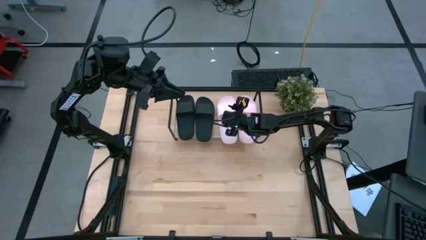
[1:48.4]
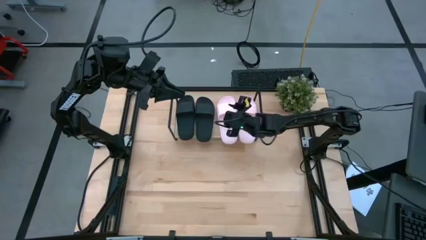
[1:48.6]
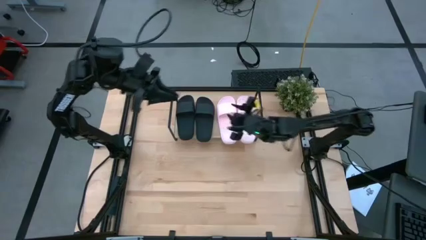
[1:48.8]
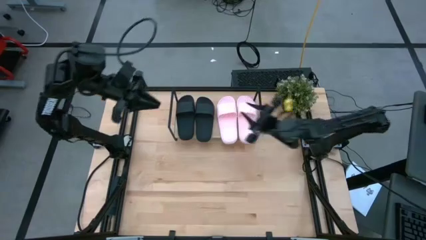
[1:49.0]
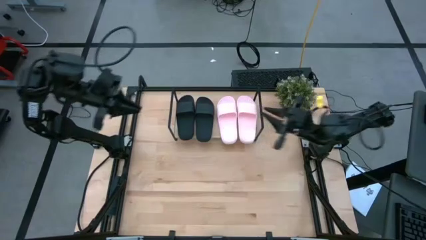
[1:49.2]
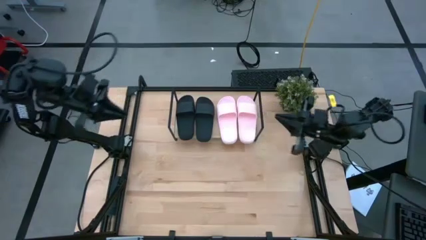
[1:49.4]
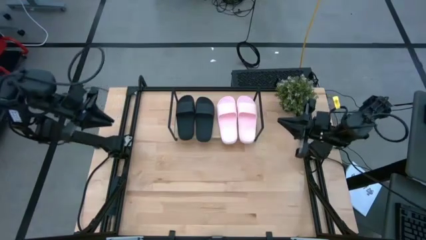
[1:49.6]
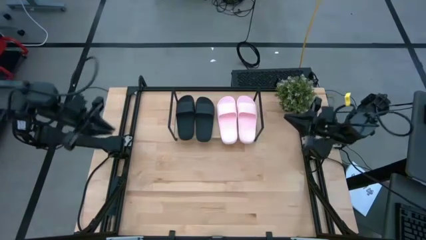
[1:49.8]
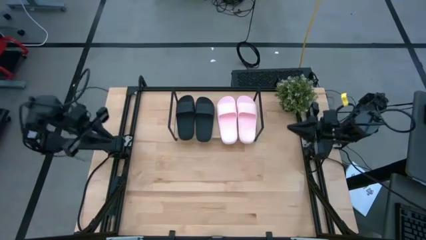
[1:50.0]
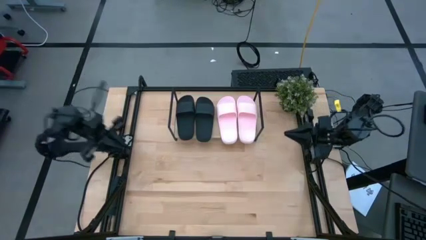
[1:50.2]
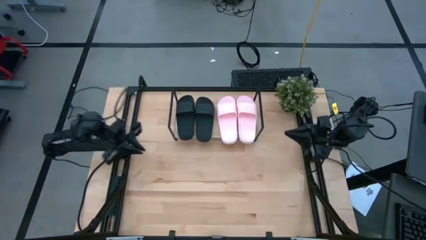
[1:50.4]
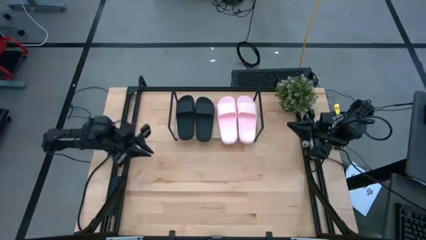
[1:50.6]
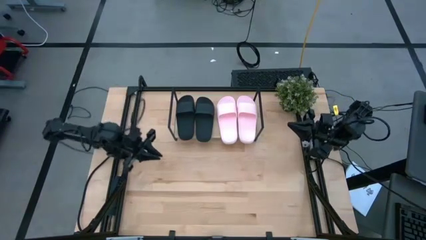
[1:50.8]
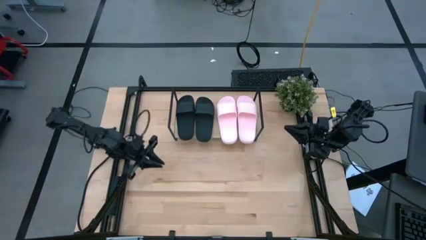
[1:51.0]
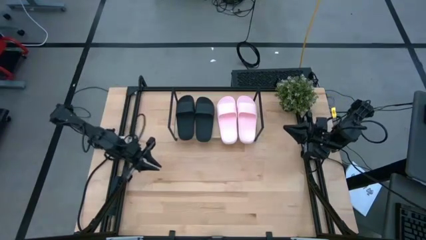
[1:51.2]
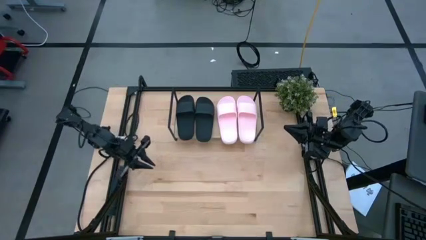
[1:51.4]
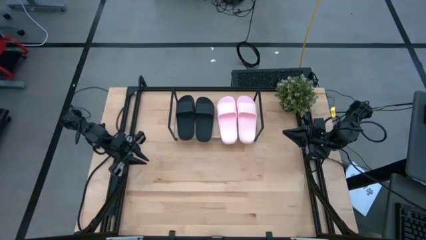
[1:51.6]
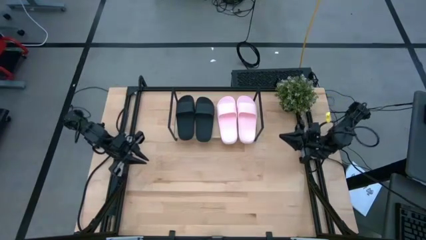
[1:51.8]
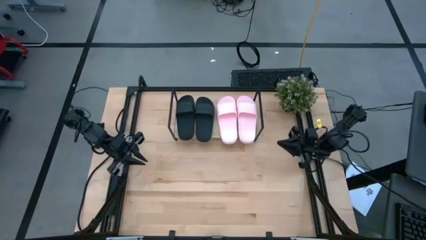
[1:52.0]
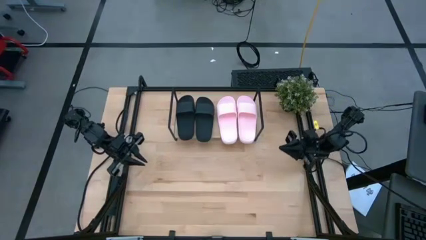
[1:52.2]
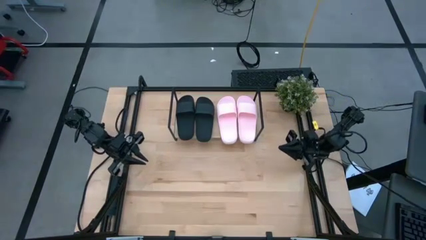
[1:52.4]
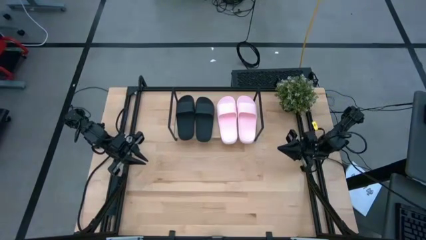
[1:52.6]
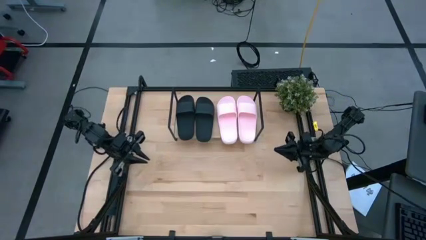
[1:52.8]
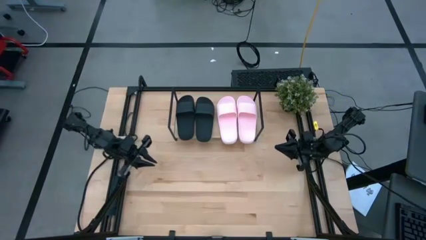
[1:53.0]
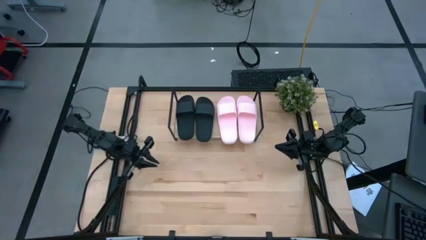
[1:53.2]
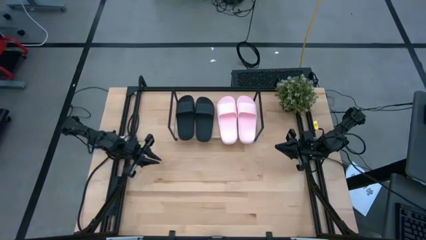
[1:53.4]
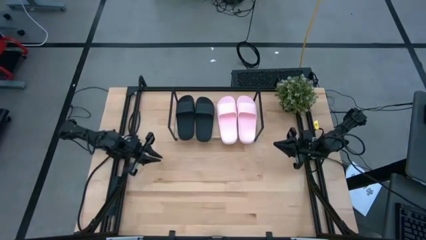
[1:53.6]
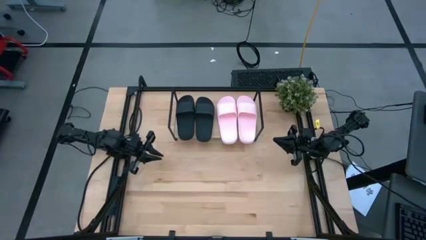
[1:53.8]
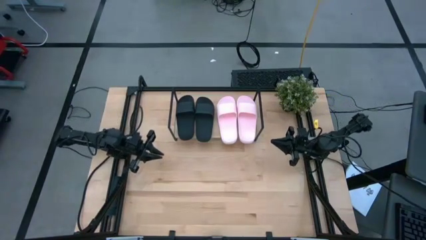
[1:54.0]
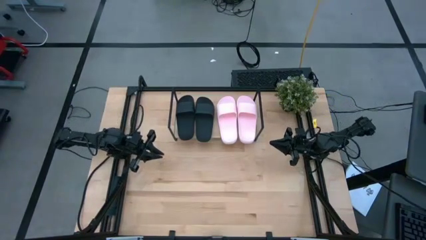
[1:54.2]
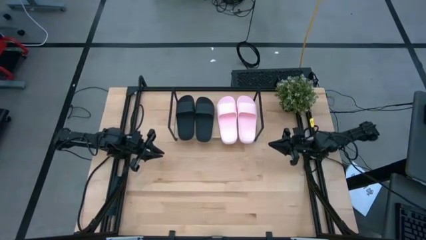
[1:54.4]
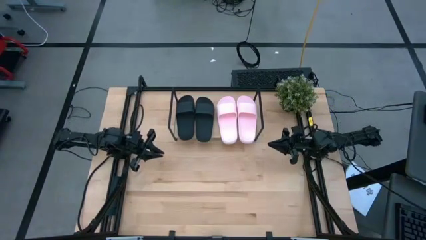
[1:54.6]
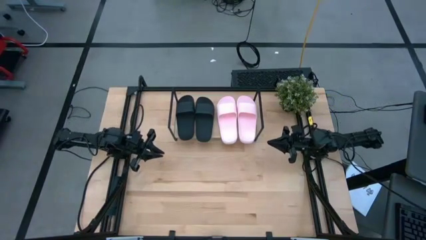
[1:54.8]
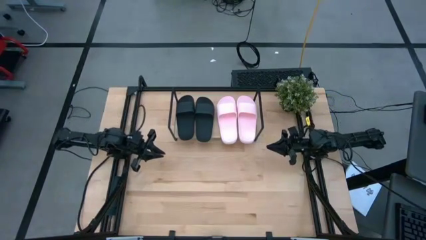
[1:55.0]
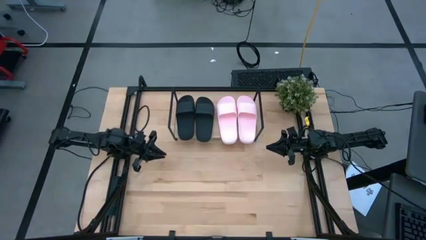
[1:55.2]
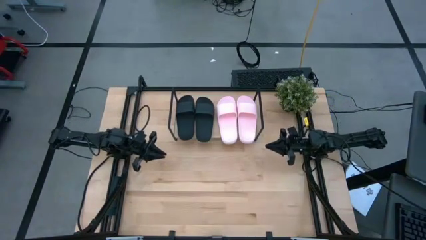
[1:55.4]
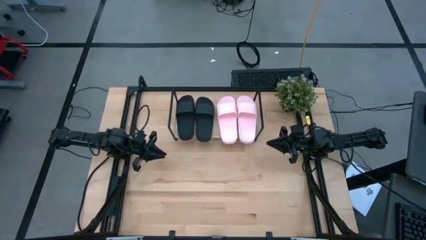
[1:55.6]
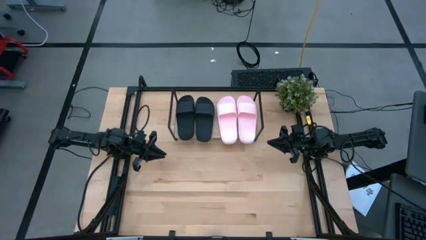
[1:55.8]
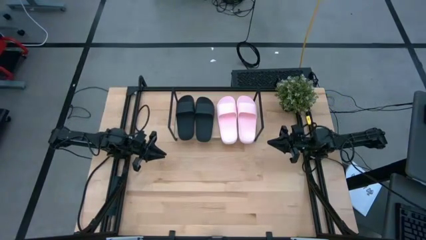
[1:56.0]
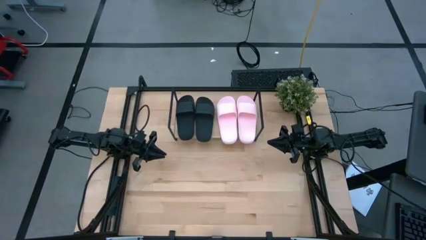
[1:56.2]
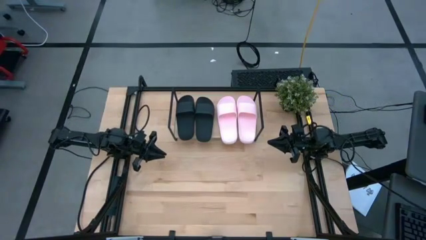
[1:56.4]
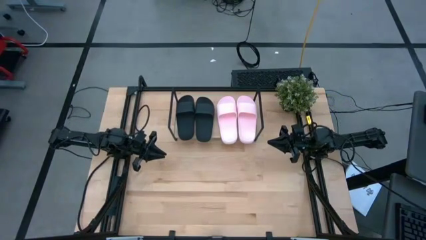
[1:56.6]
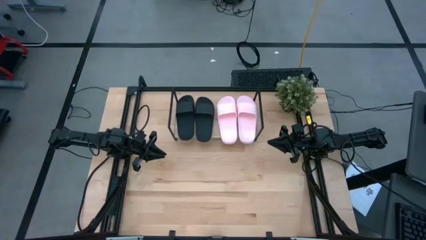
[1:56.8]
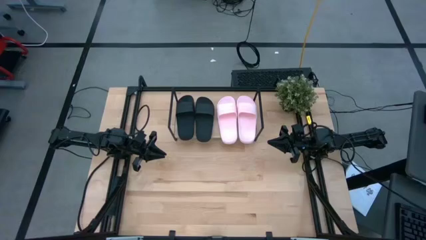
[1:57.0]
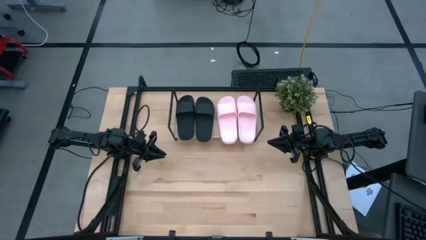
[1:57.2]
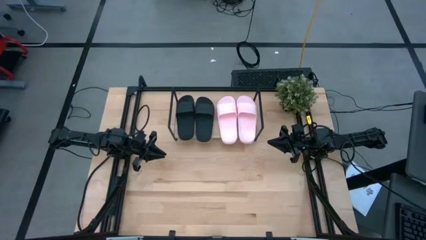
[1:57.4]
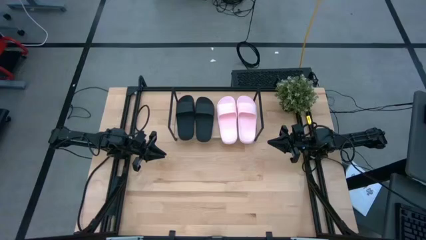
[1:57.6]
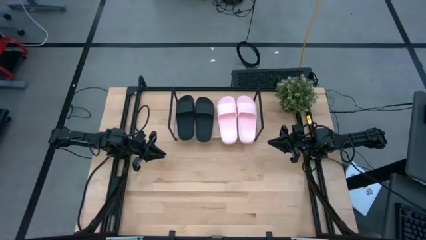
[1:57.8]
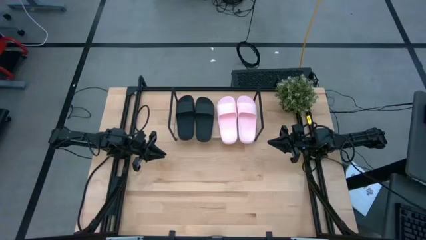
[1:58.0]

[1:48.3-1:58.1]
Task: Pick and place slides into the shelf
Return to Home Position
